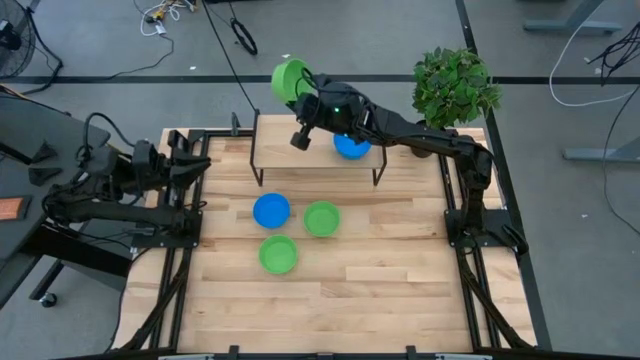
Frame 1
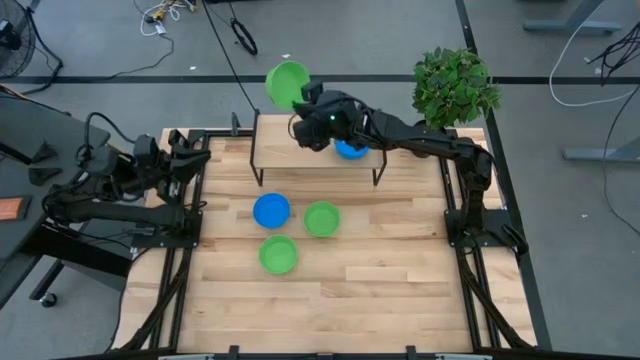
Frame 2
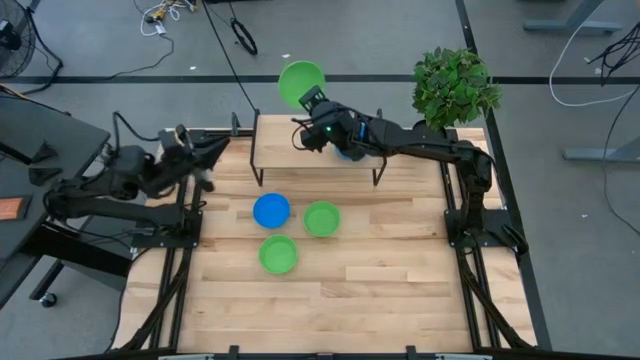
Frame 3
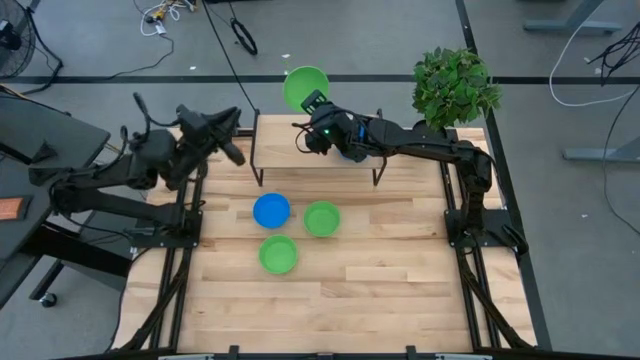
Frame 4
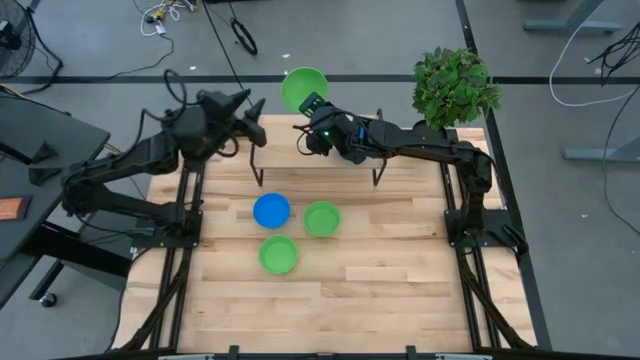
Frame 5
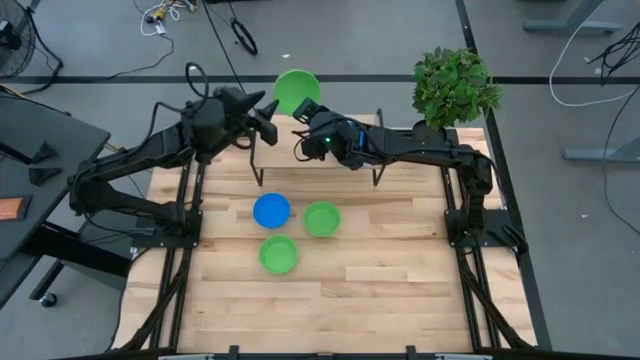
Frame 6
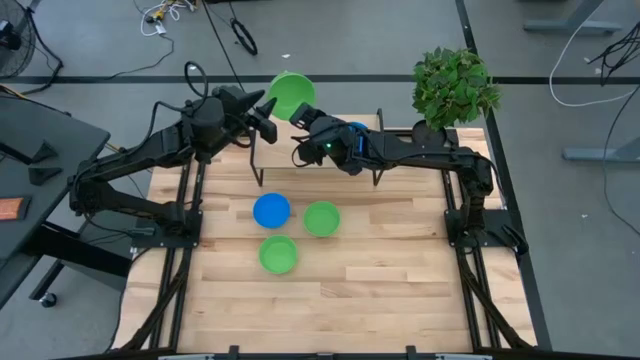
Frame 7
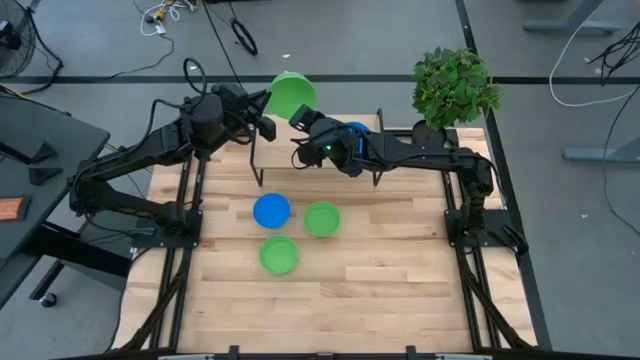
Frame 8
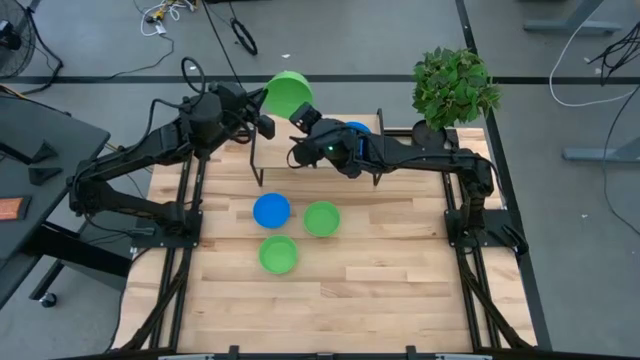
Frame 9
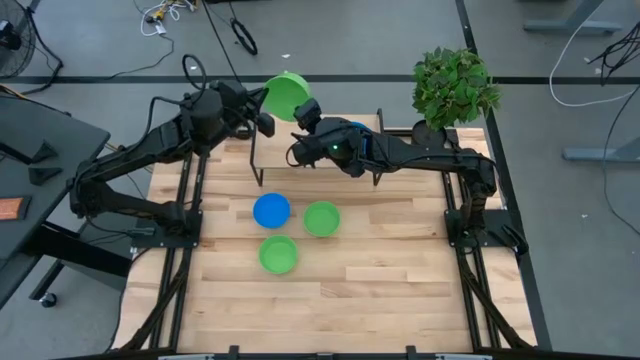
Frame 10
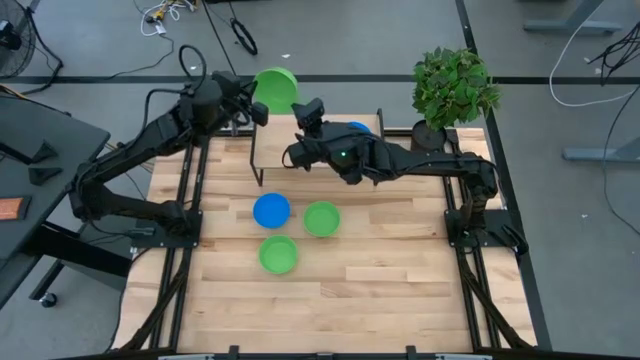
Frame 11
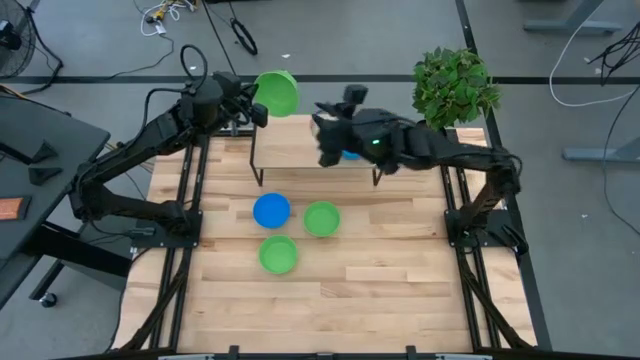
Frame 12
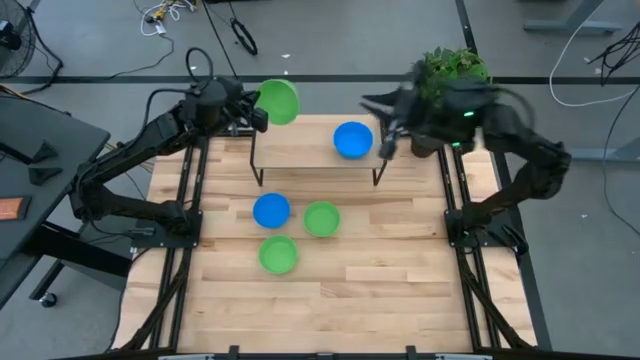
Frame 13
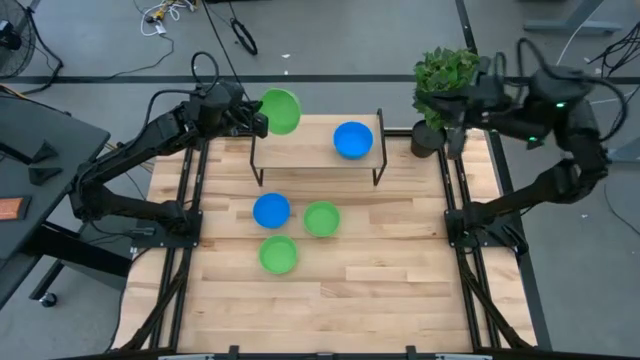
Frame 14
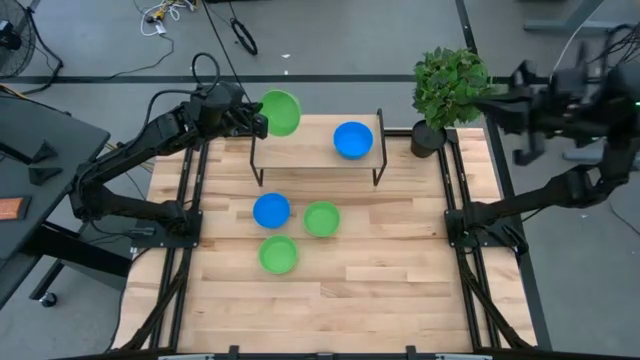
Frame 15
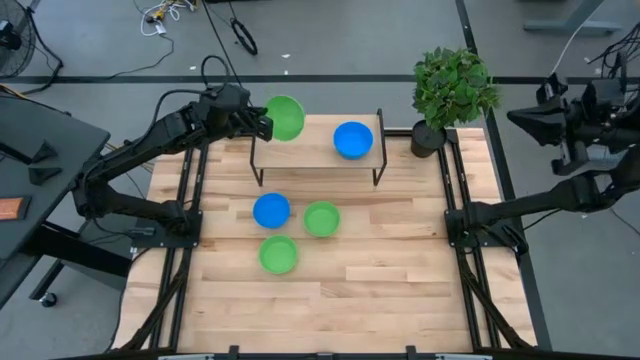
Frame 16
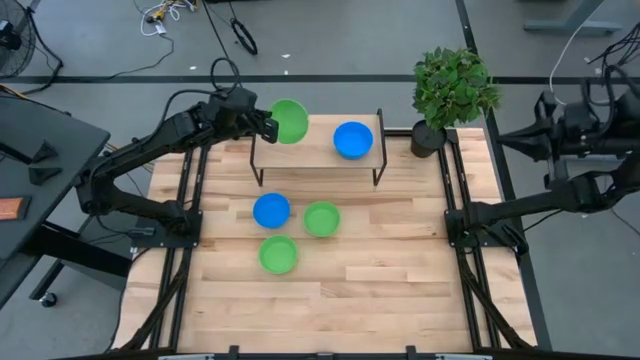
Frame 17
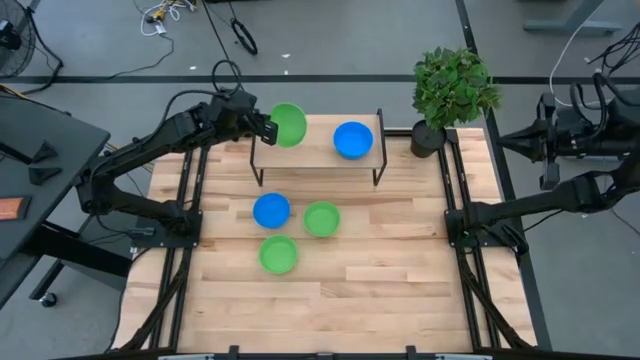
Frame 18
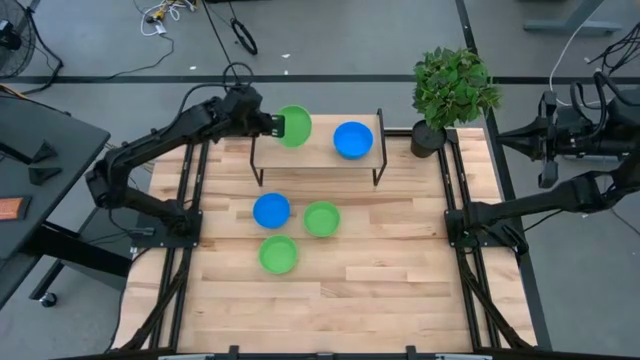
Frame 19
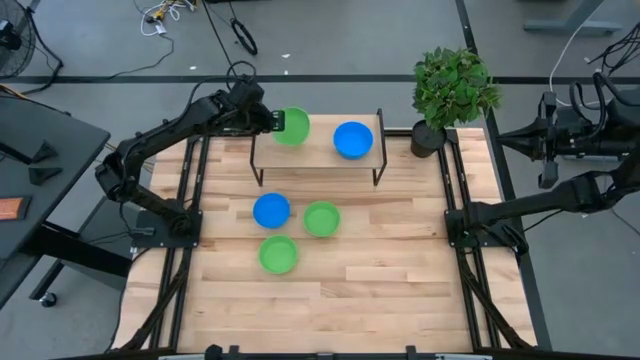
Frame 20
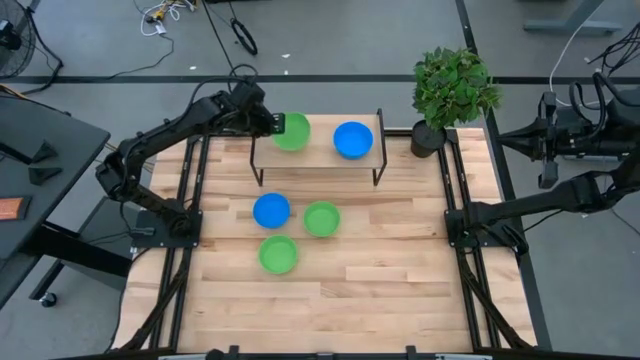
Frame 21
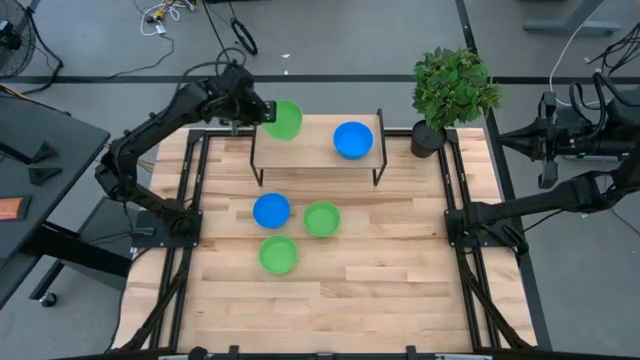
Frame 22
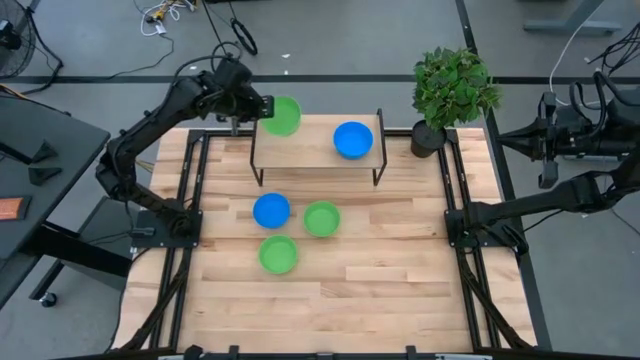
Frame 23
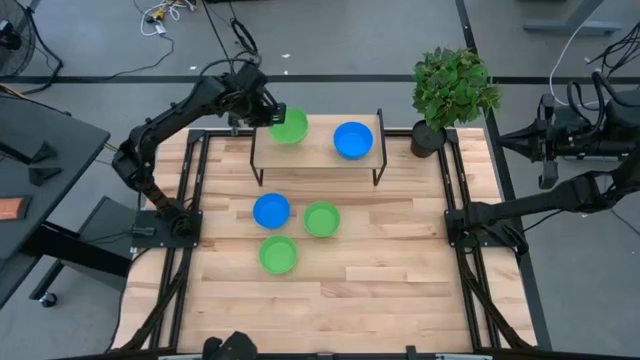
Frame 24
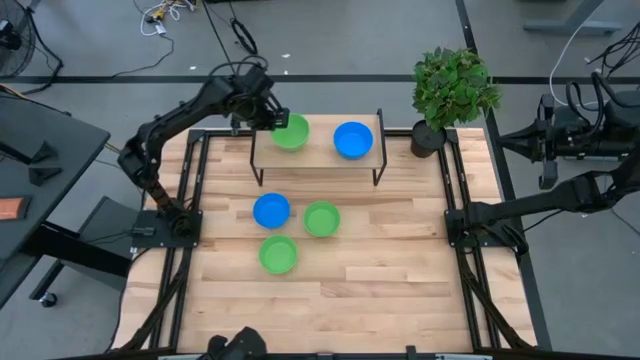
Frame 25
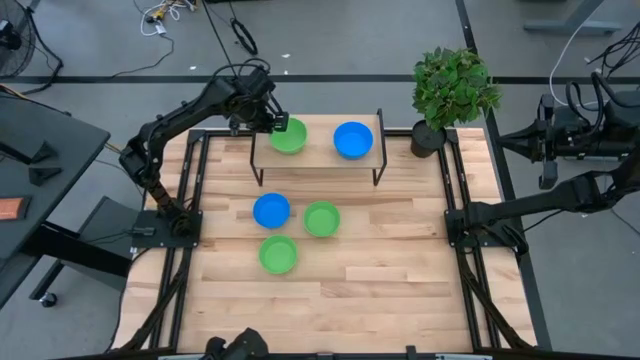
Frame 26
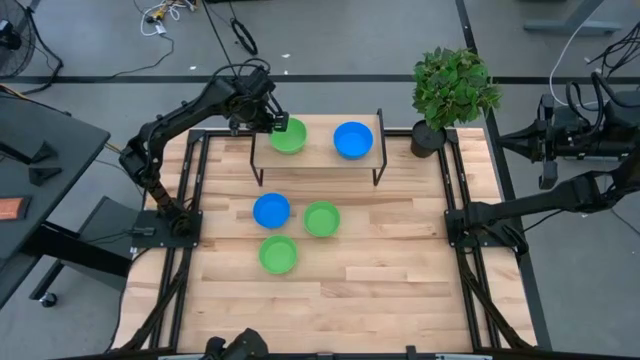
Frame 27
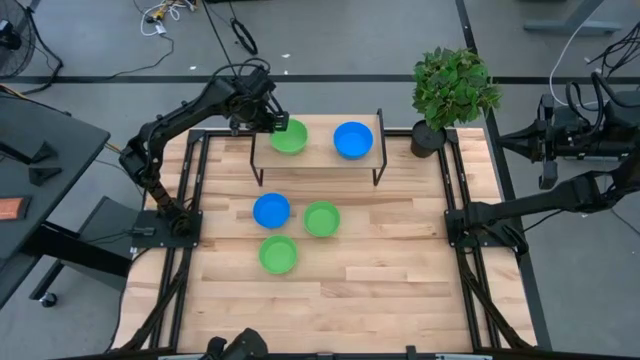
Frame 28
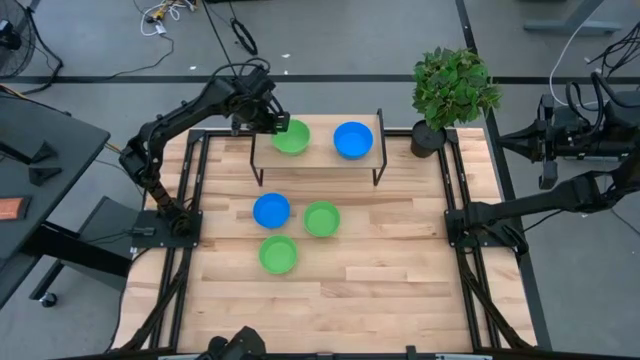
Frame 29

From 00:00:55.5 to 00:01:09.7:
Task: Pick & Place Mini bowls
Put the right green bowl on the shelf

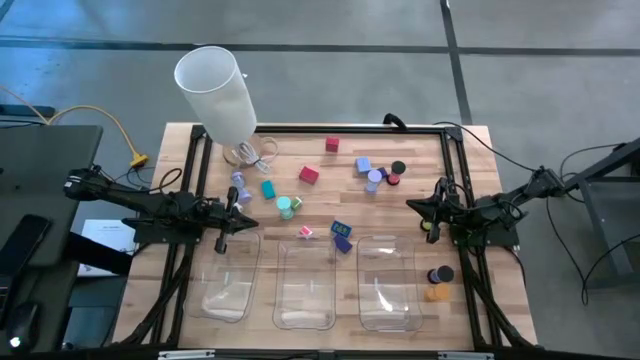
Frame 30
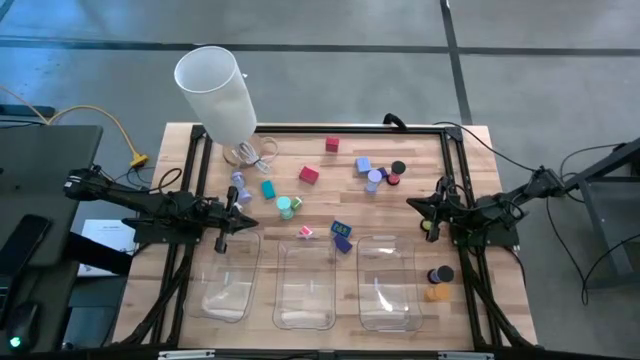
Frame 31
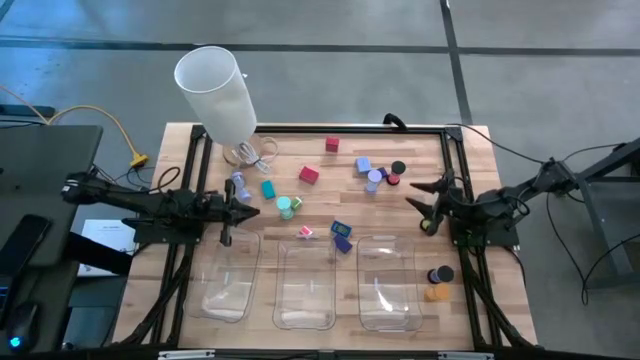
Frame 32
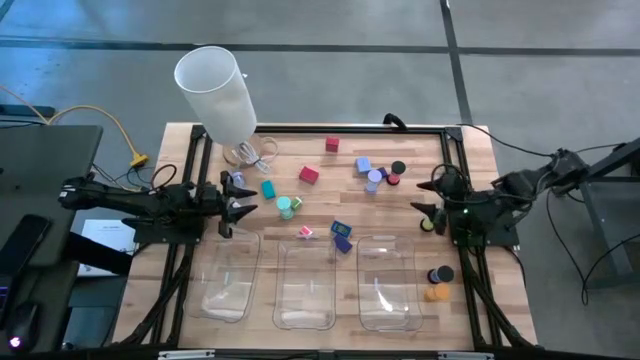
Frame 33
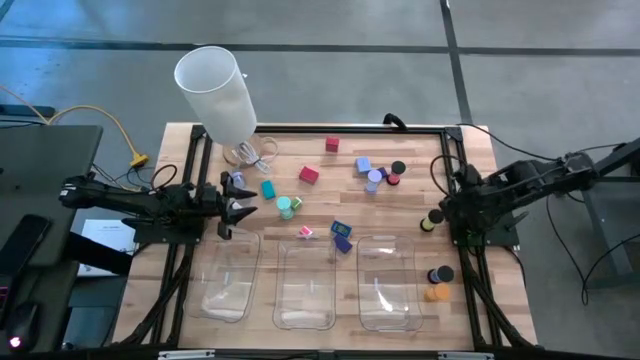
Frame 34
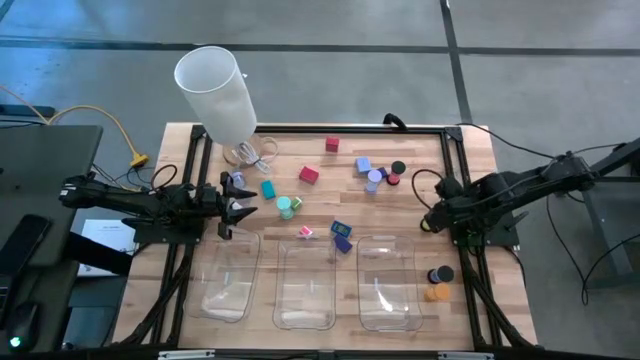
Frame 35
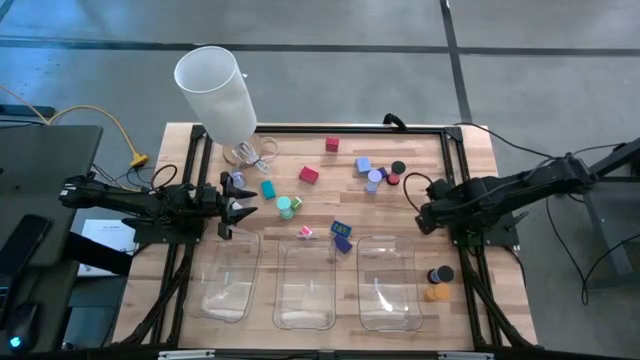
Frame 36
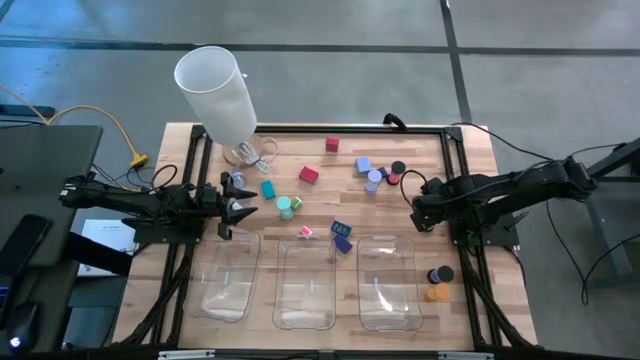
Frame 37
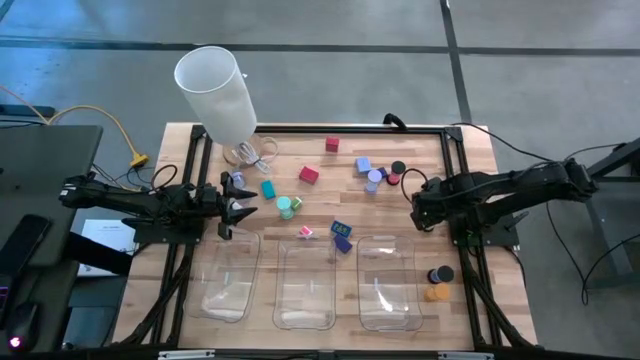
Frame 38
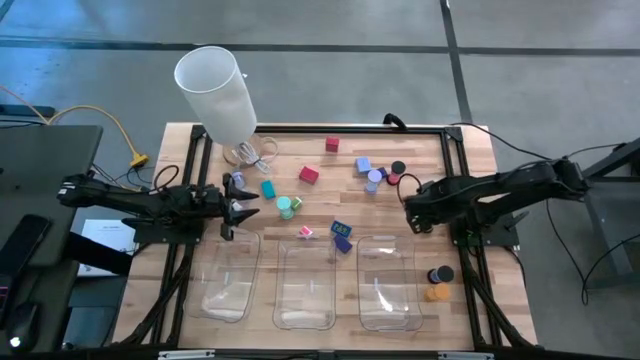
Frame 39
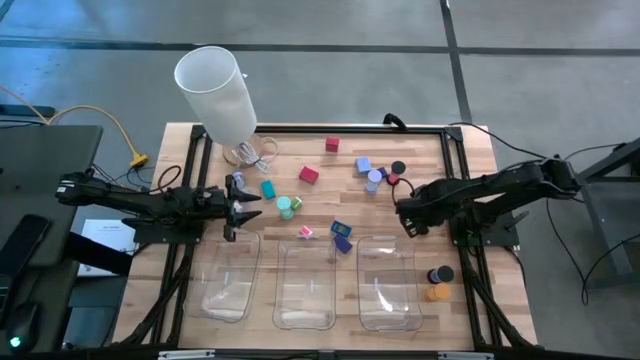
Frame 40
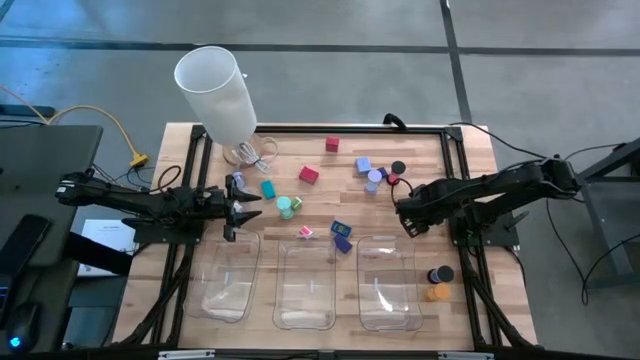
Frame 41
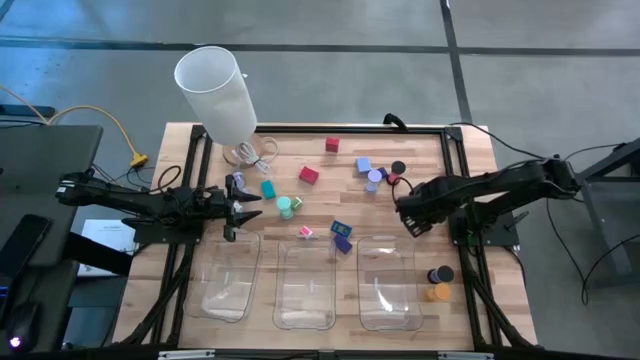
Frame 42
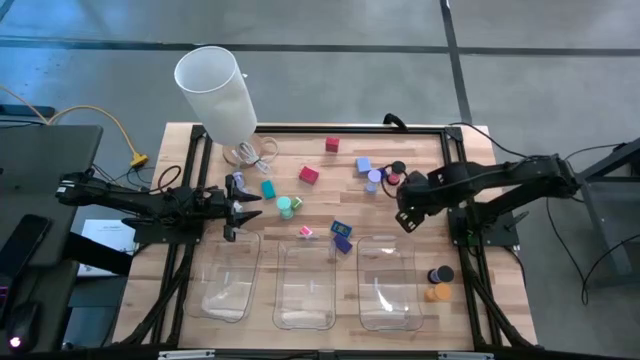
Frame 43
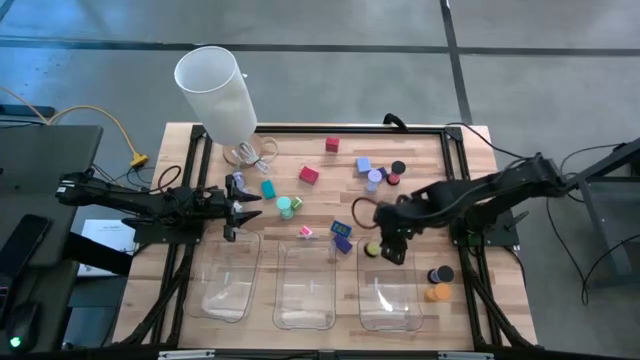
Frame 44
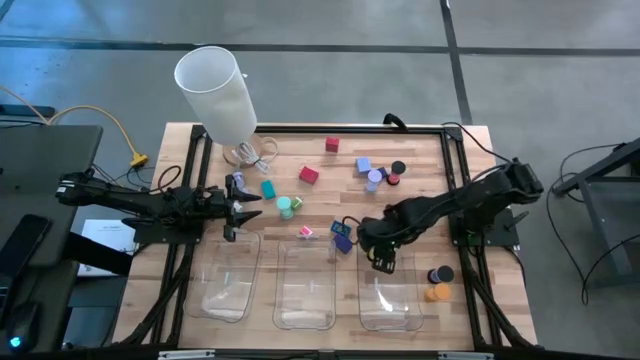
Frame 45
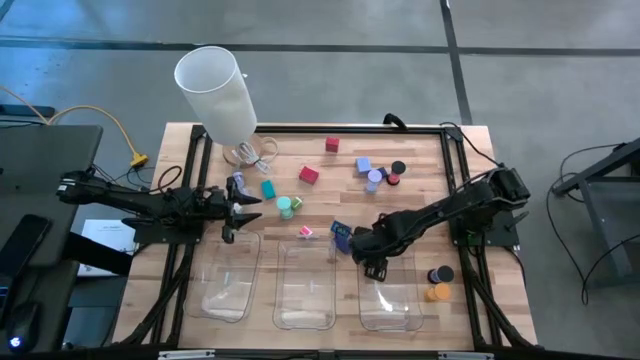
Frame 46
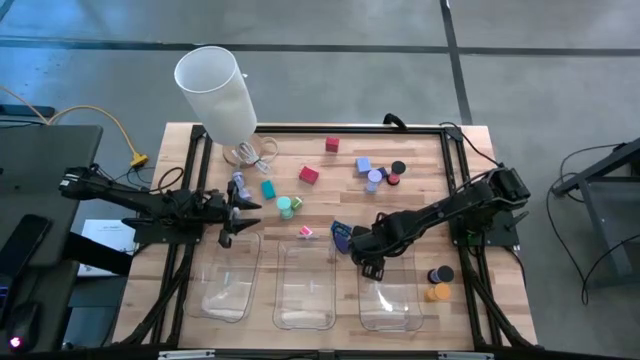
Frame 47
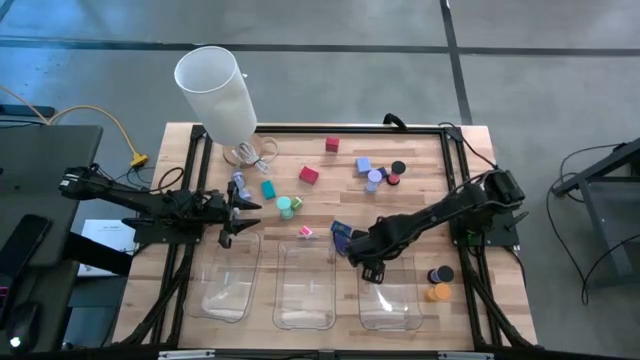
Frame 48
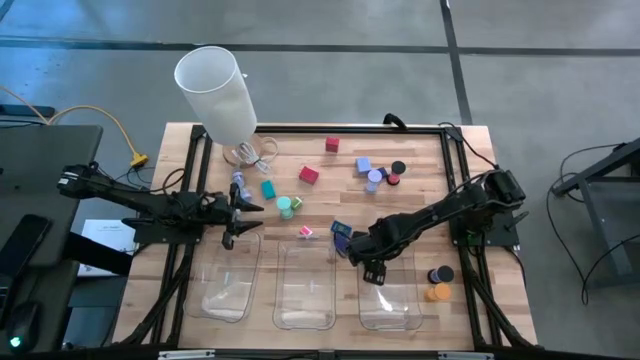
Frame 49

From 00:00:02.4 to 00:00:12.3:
Task: Pick & Place Office items
Put the green hourglass into the right bin
